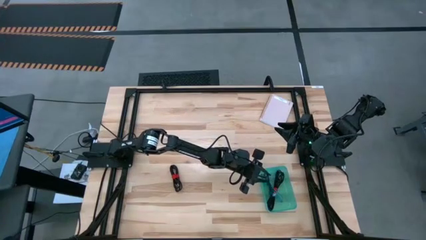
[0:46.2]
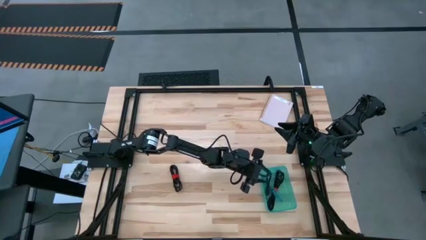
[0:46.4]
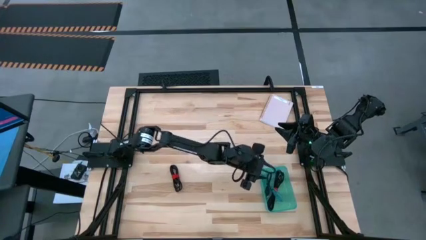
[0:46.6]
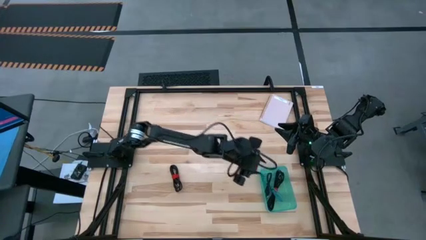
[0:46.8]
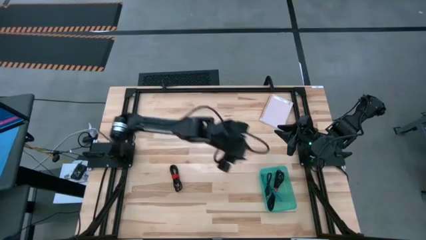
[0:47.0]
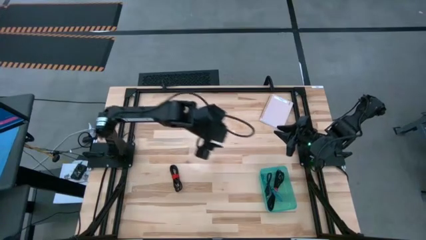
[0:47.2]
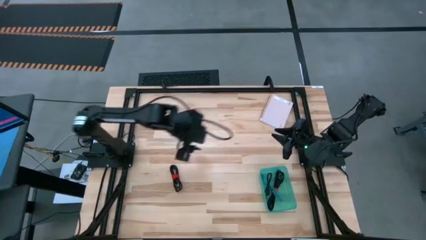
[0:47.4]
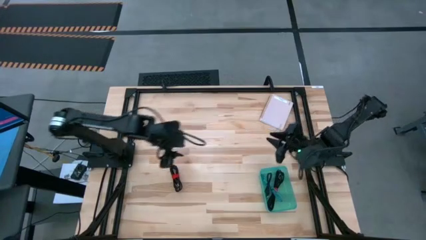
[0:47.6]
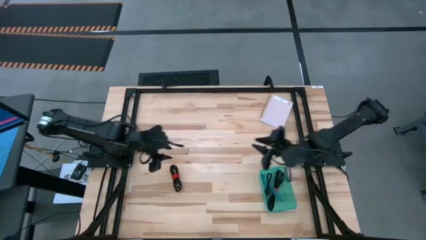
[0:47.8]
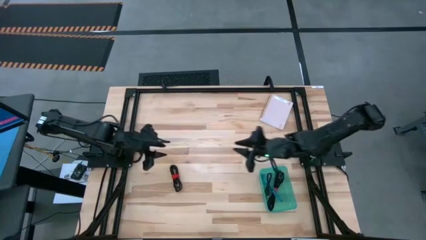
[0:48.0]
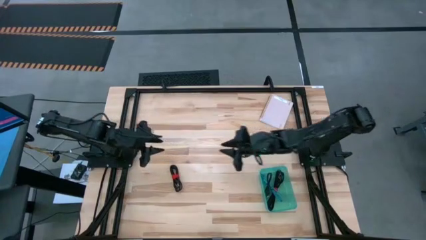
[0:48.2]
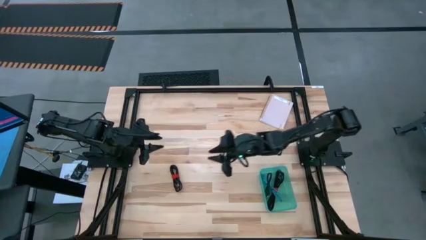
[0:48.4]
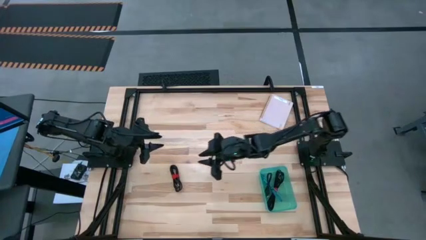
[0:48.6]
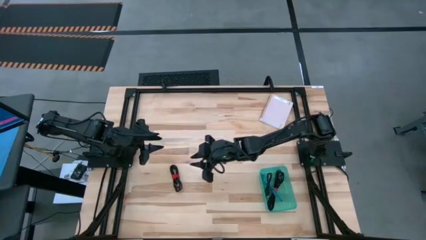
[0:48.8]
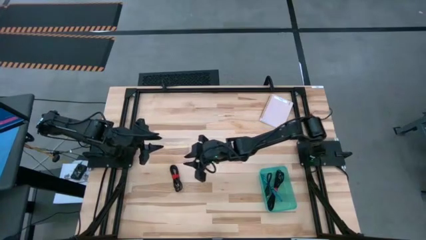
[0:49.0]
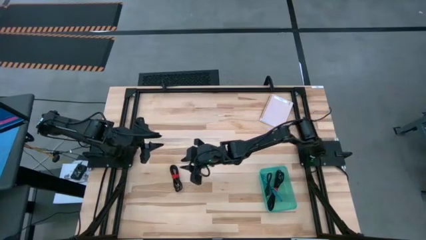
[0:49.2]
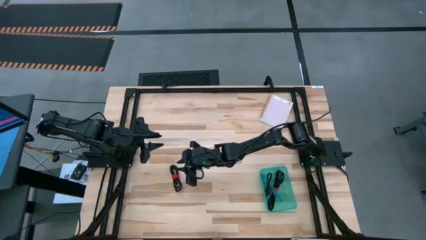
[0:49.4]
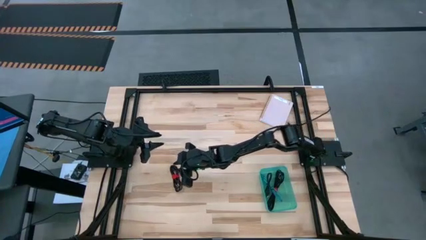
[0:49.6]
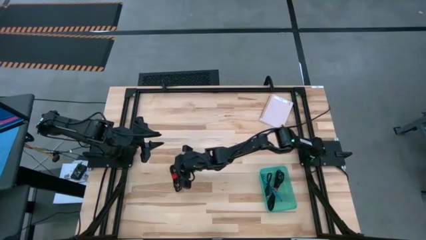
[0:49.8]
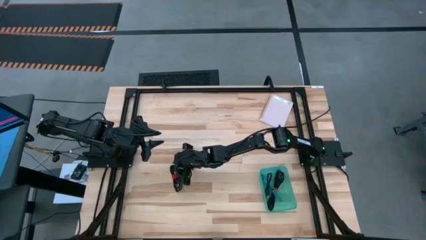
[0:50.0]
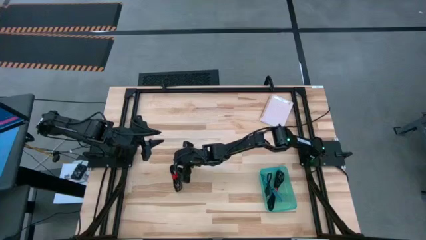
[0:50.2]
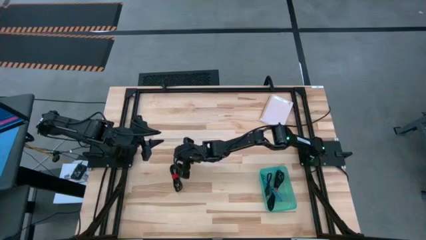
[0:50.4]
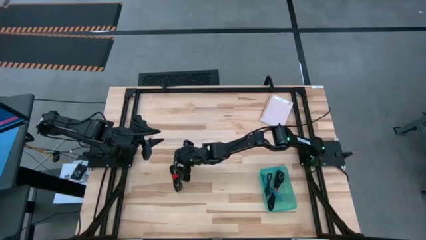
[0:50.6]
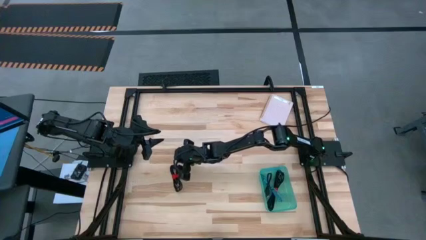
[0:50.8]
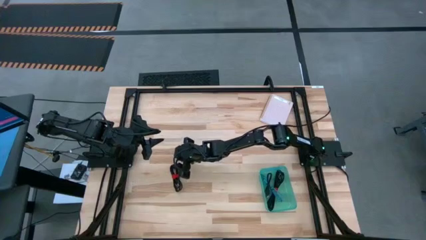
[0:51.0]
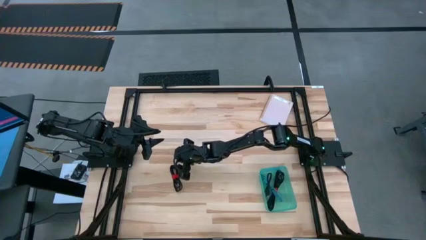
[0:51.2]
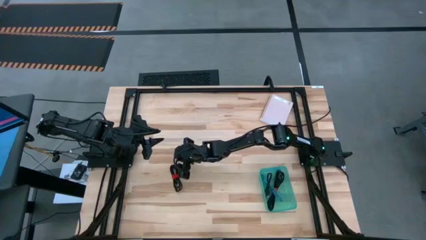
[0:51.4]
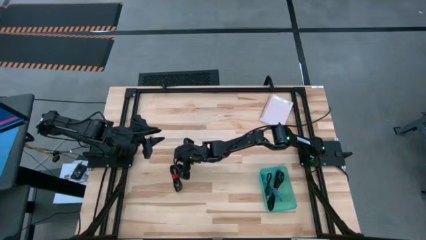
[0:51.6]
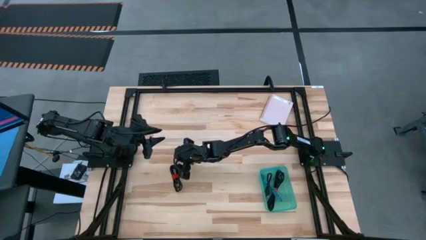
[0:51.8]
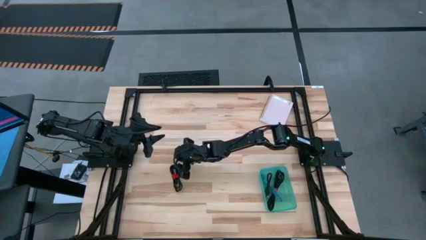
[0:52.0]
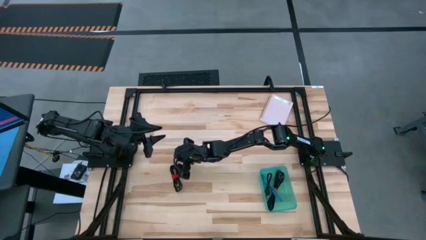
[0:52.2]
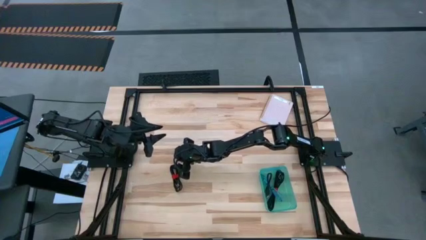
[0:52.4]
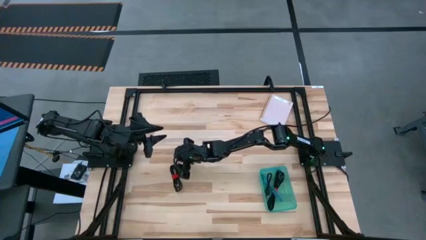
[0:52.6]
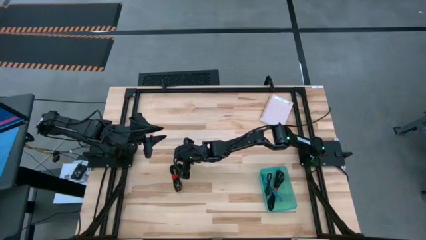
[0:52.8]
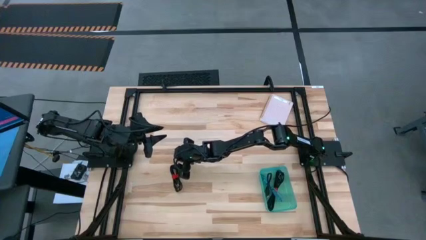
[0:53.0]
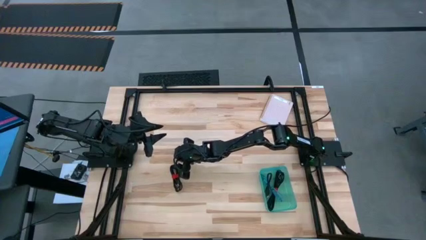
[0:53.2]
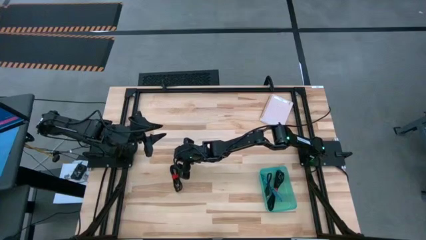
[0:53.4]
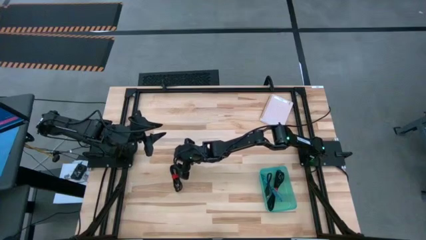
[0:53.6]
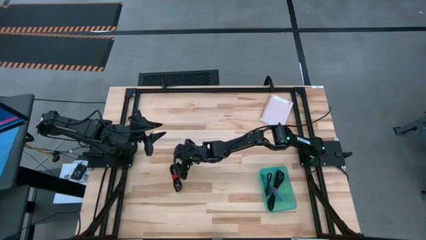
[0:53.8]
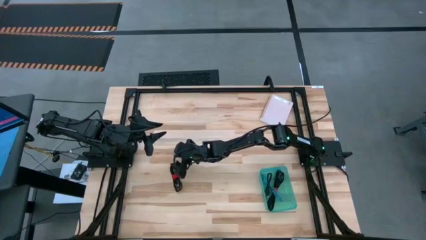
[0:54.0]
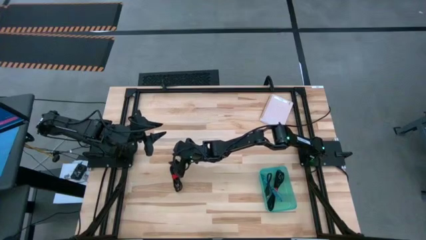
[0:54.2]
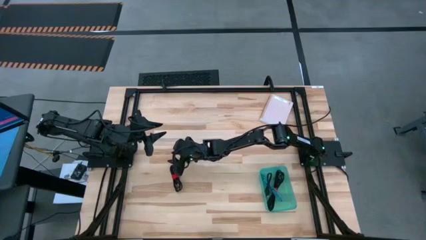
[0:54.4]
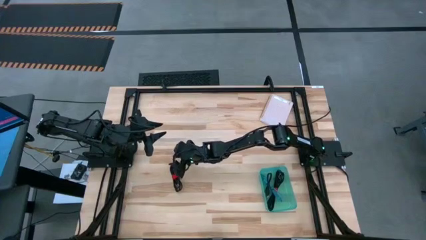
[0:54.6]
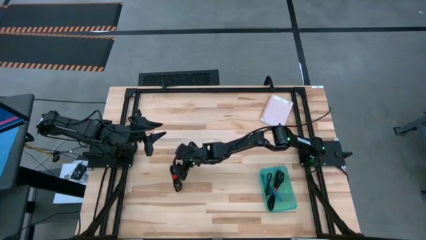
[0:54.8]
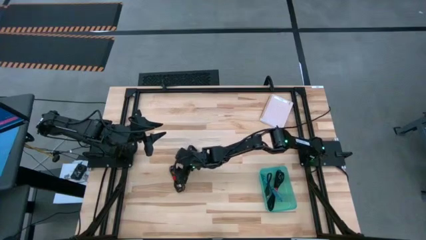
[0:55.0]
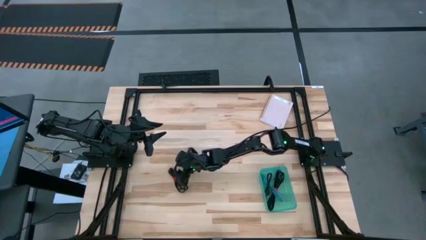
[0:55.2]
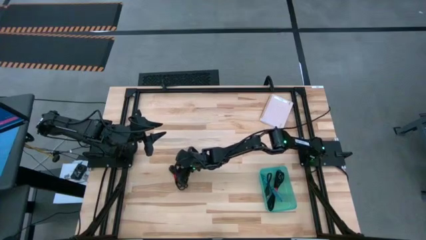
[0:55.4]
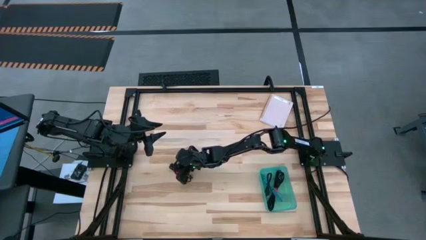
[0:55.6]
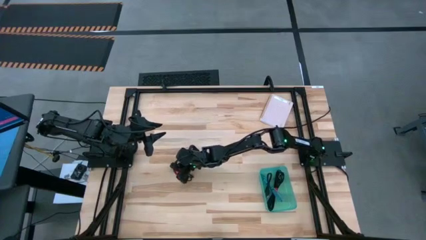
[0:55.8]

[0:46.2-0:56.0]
Task: Pick and place USB-C Cables
Put the black charger cable into the green bin

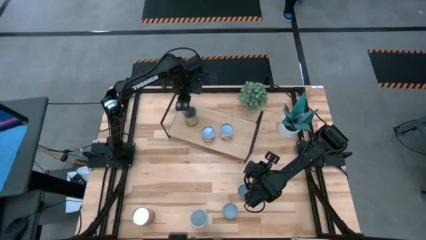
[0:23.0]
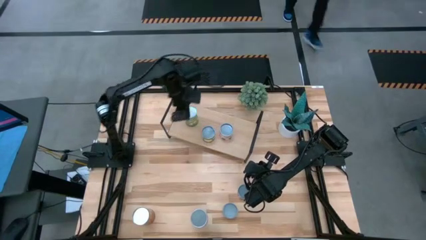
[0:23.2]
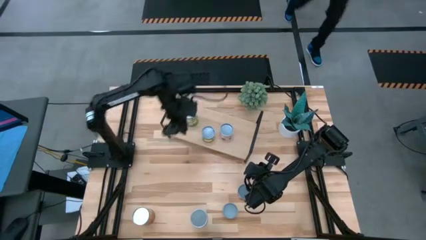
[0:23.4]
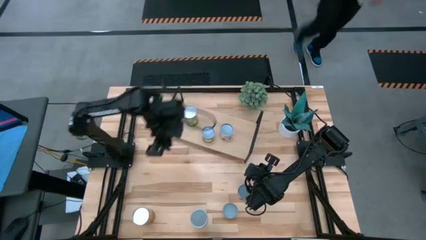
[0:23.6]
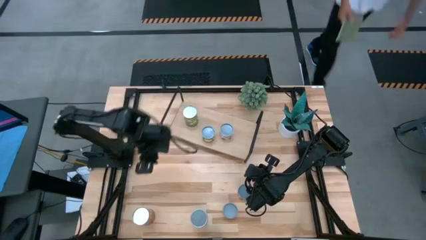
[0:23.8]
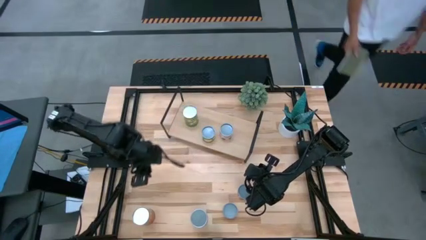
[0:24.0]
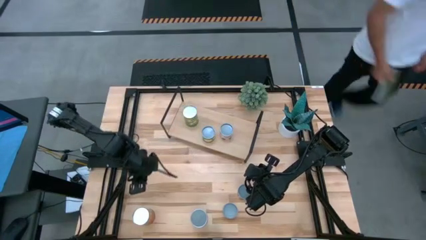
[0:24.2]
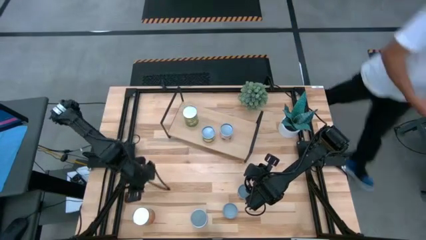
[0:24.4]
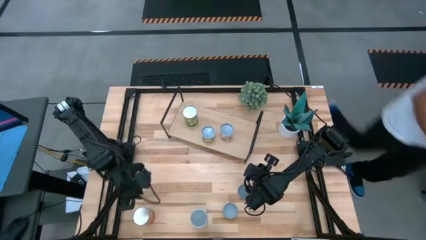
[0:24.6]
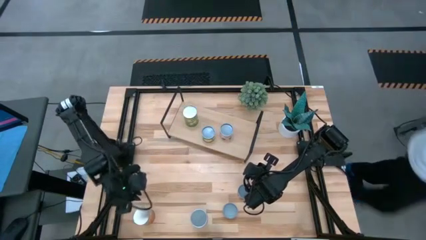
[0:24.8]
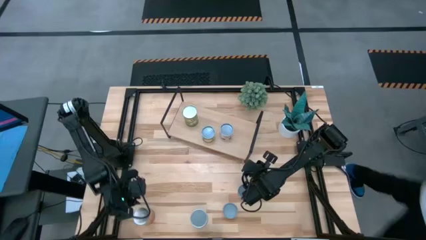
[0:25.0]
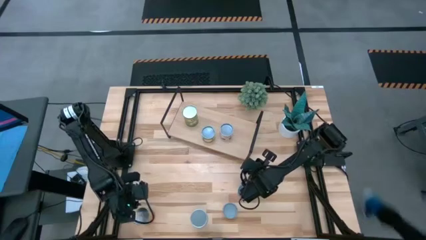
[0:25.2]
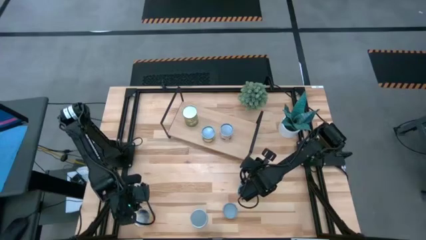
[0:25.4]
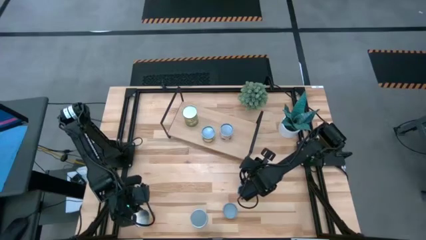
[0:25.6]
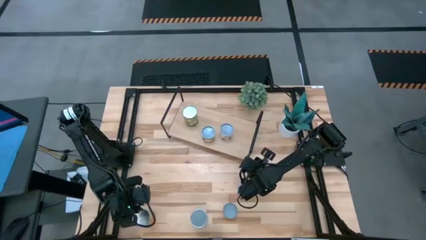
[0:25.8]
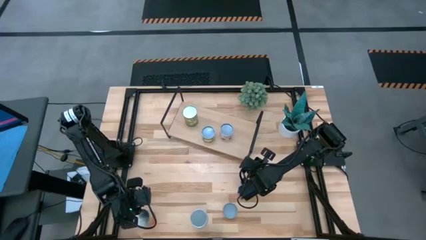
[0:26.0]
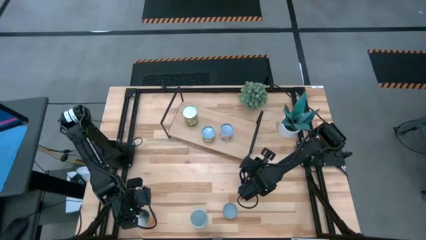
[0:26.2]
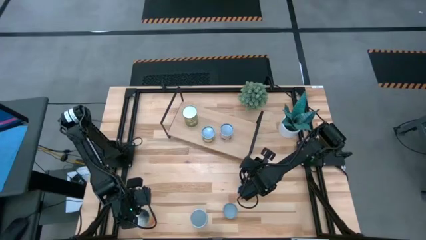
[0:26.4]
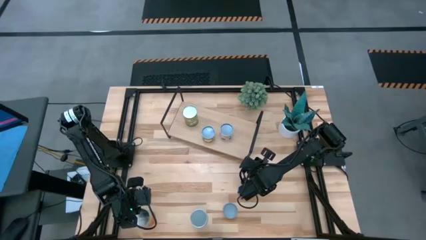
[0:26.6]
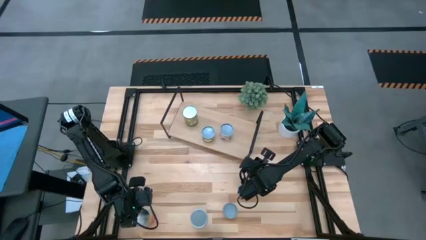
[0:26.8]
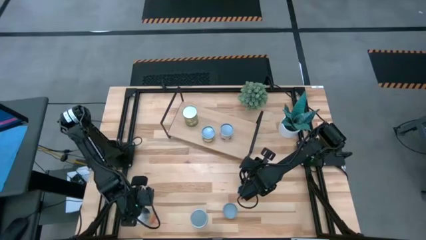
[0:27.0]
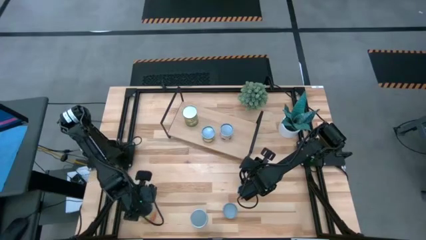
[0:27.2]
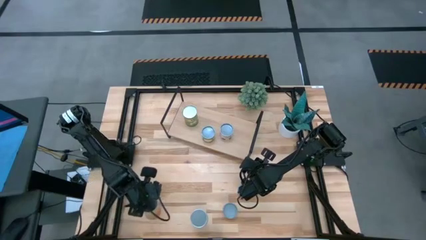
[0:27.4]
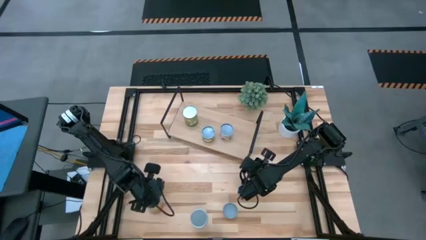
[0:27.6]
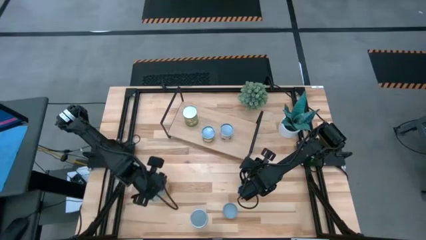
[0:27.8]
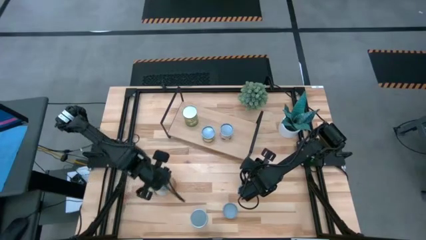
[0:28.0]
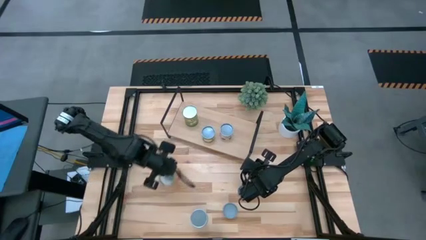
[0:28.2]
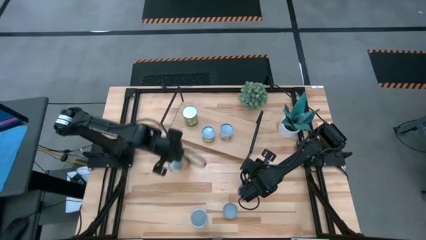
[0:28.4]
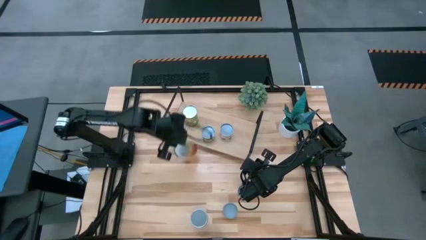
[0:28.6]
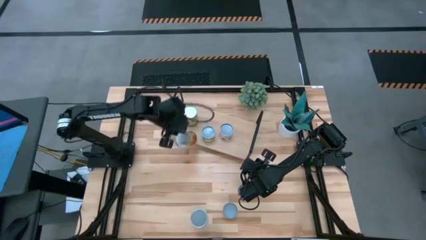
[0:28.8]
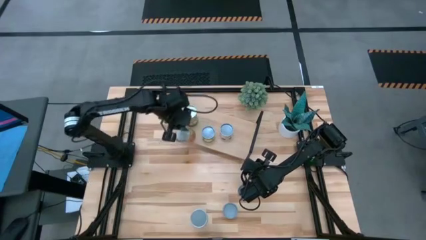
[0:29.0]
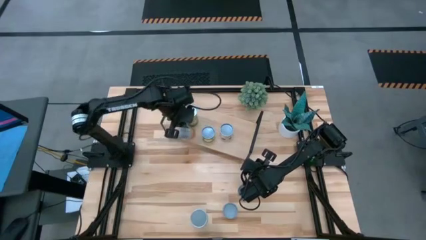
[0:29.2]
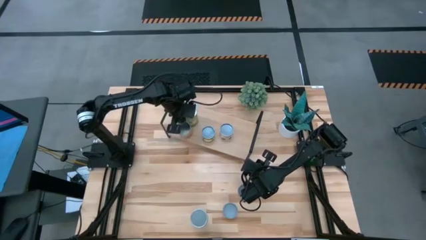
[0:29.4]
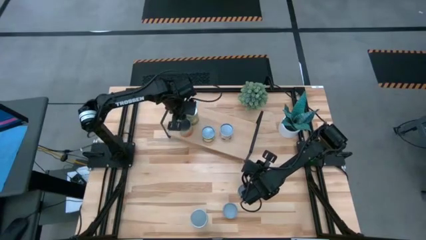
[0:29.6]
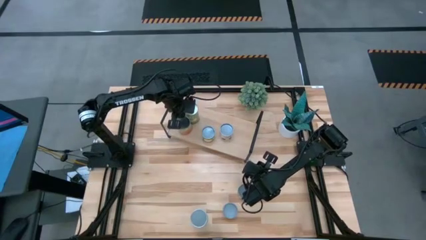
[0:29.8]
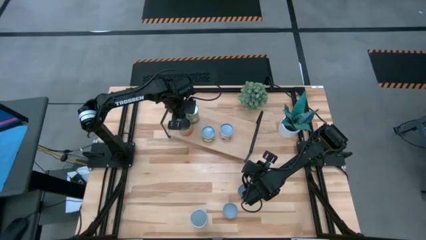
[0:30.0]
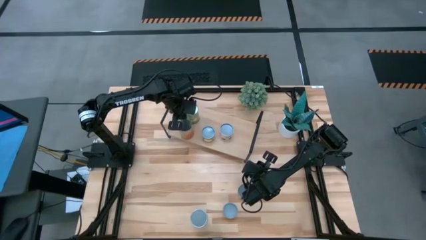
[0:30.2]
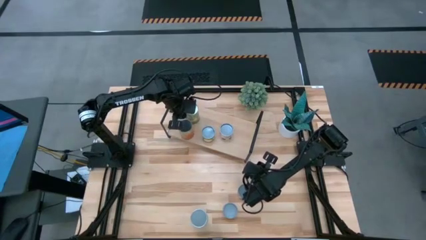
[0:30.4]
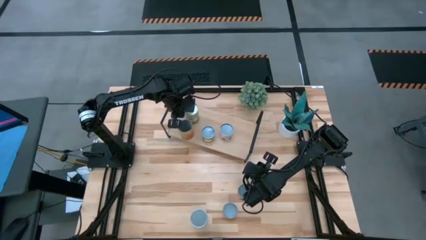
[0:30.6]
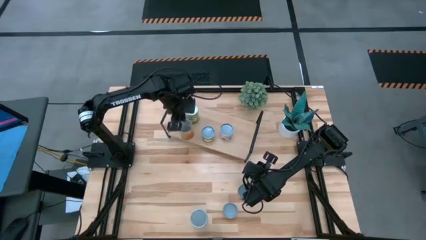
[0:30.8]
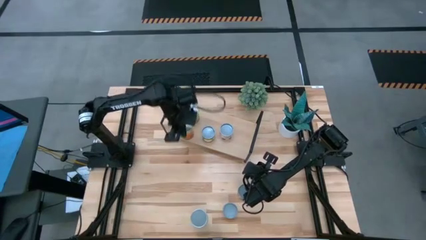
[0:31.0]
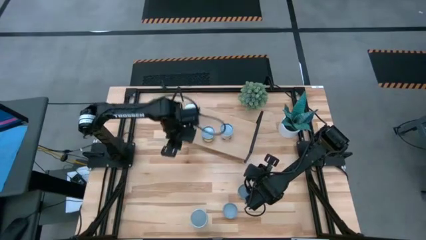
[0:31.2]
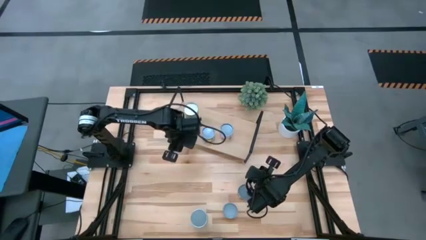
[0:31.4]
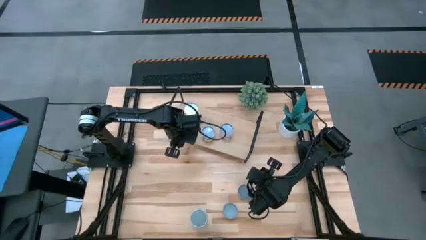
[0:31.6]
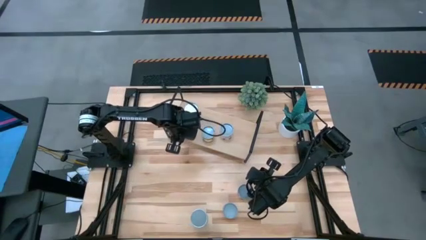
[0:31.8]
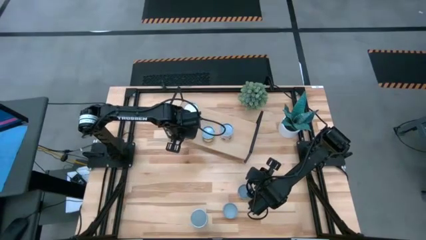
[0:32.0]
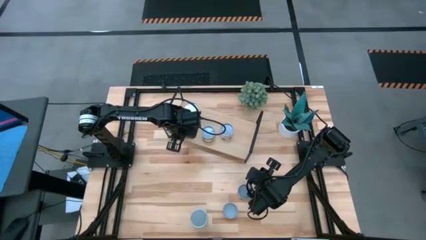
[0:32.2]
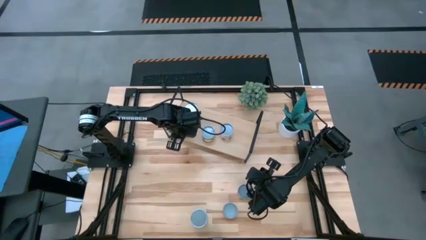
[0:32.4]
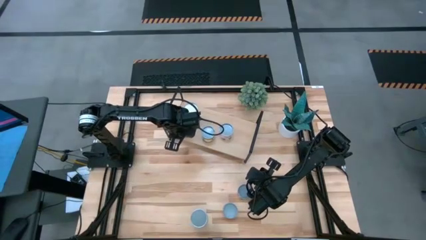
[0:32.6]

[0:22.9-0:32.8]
Task: Pick and place cans onto a shelf
Put thhe canned beans on the shelf
